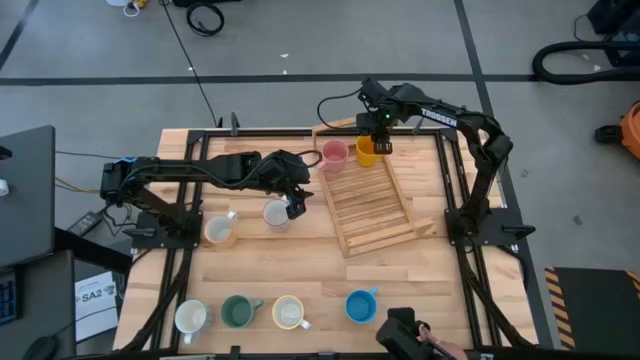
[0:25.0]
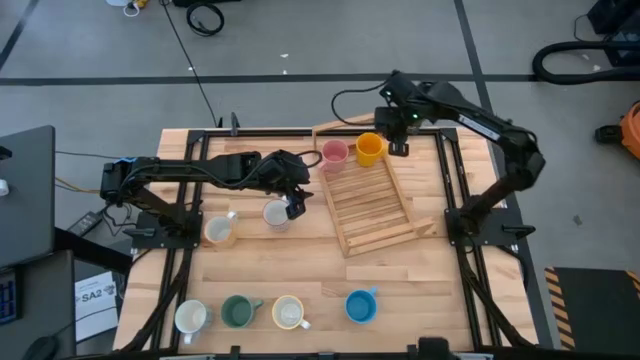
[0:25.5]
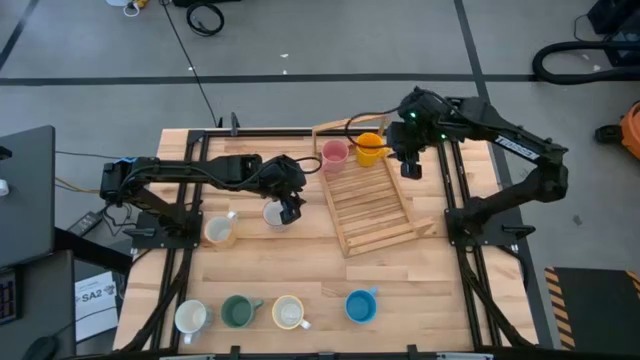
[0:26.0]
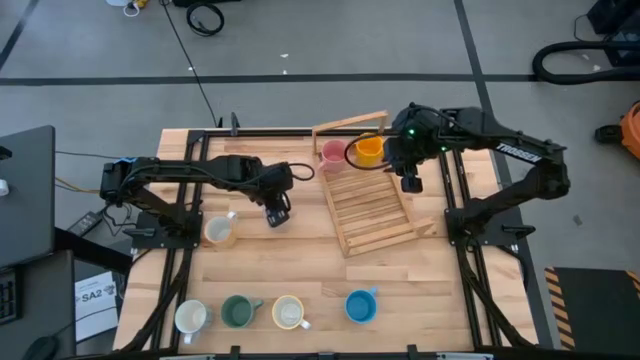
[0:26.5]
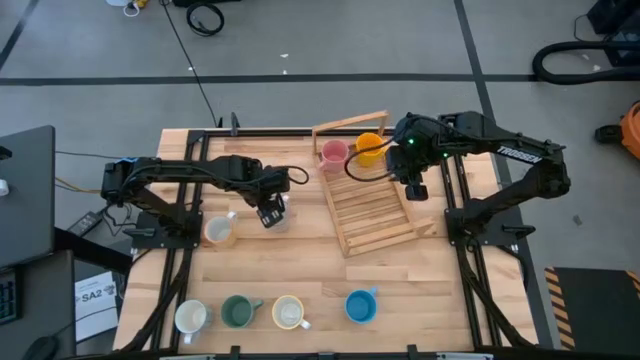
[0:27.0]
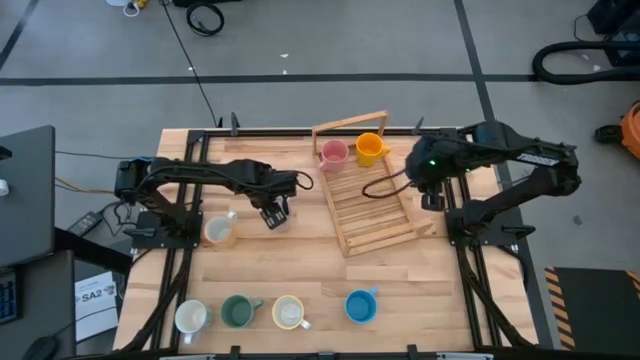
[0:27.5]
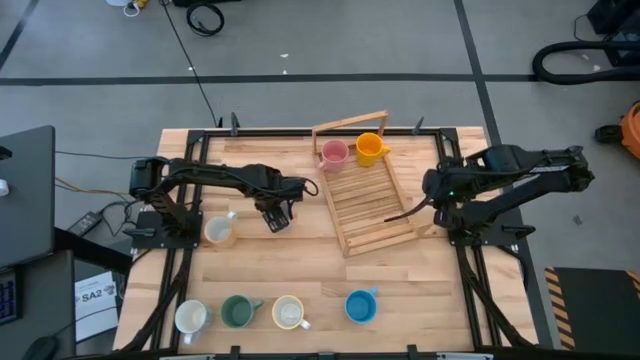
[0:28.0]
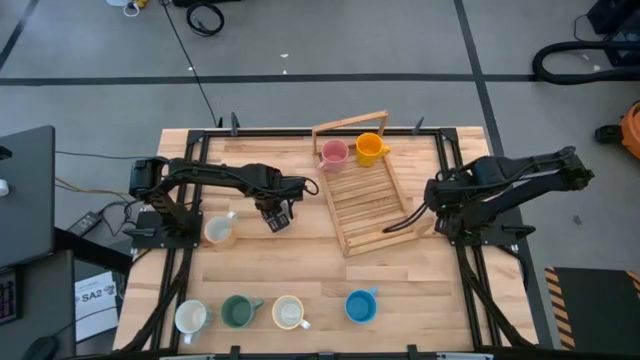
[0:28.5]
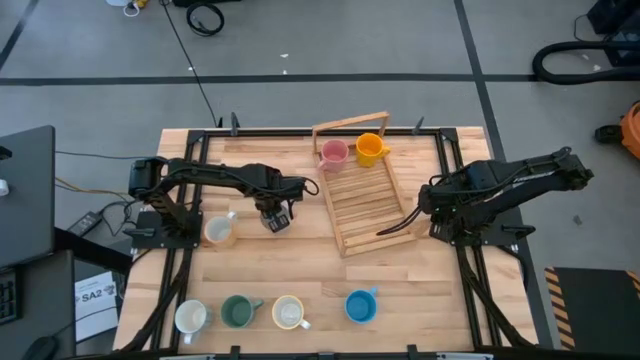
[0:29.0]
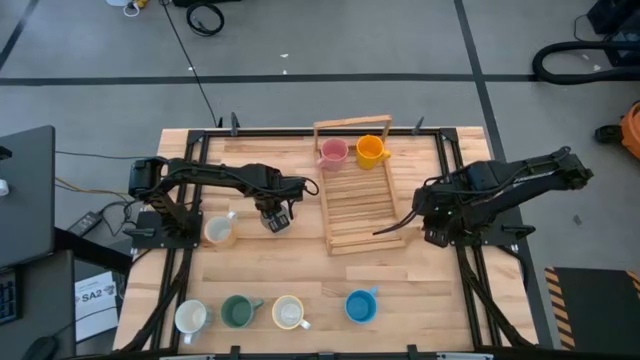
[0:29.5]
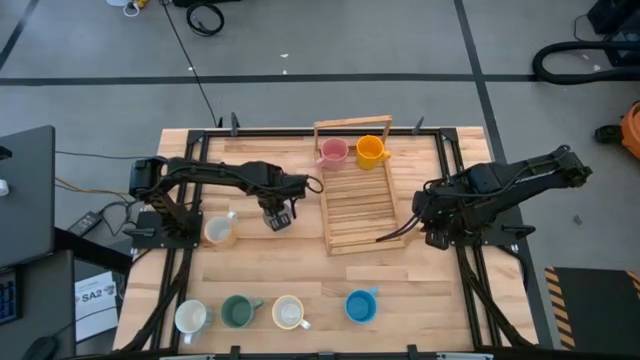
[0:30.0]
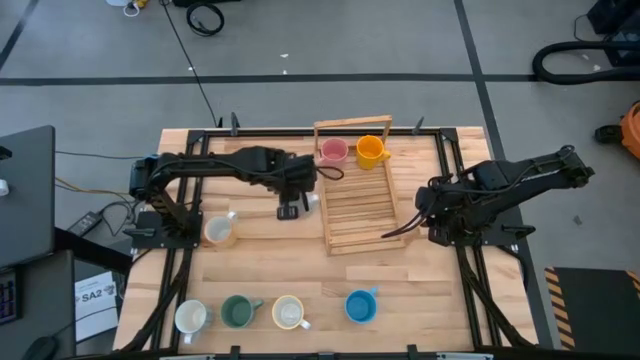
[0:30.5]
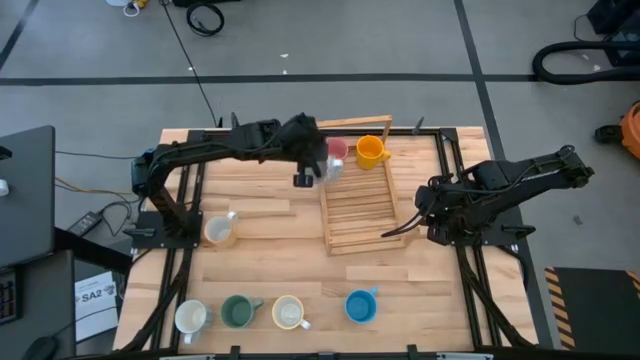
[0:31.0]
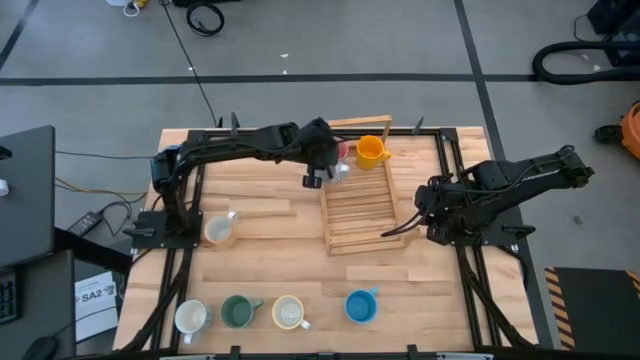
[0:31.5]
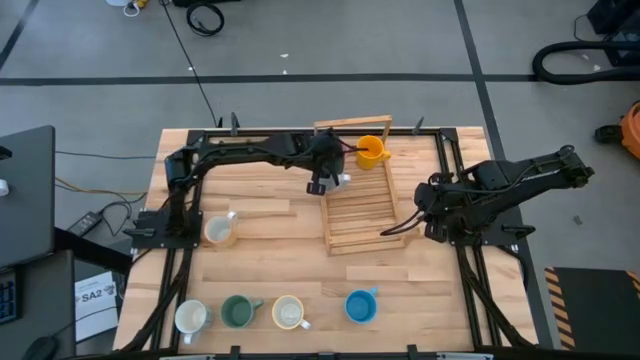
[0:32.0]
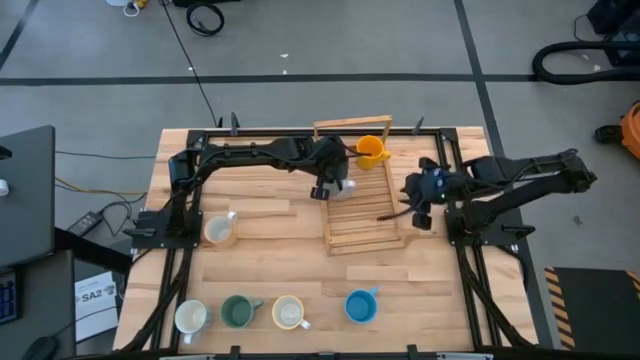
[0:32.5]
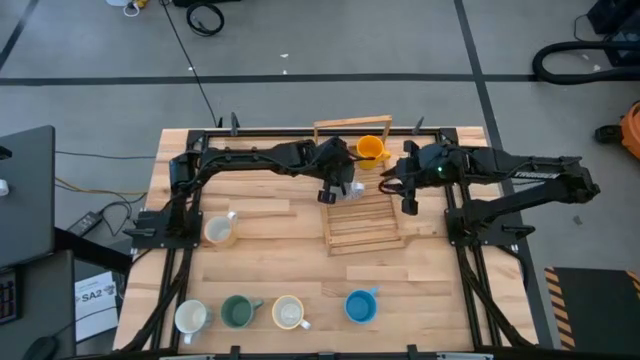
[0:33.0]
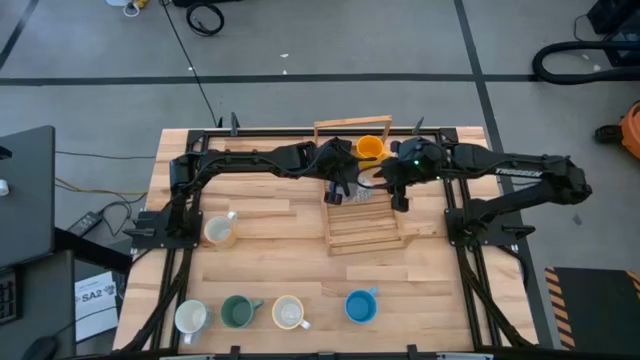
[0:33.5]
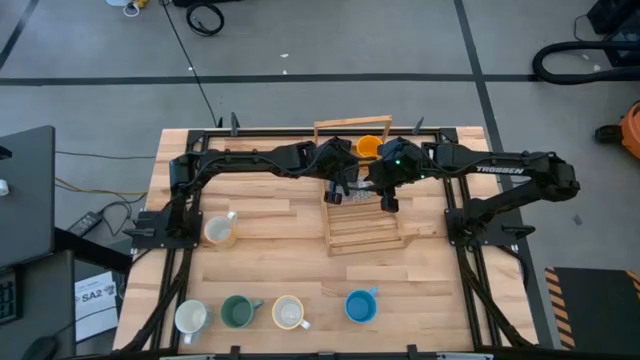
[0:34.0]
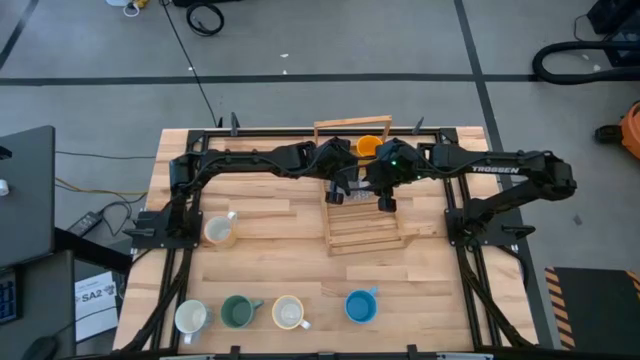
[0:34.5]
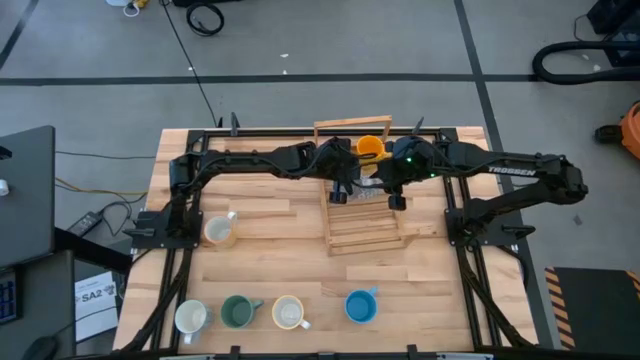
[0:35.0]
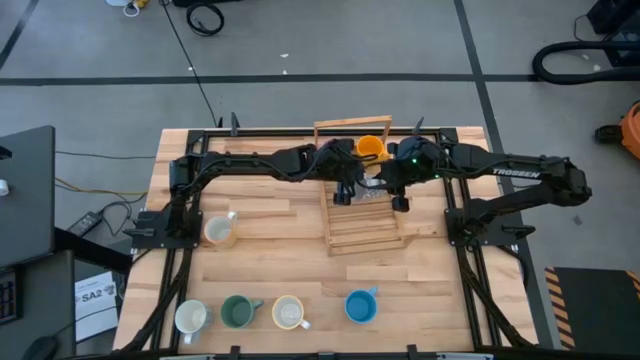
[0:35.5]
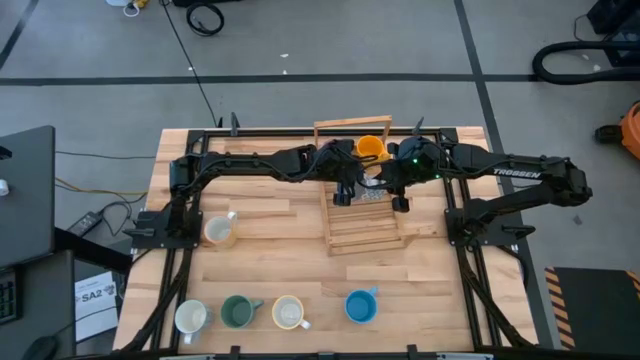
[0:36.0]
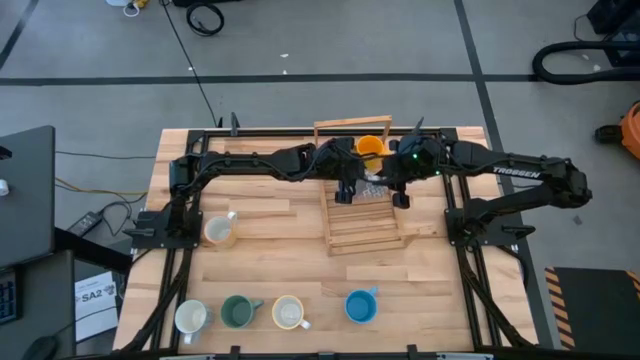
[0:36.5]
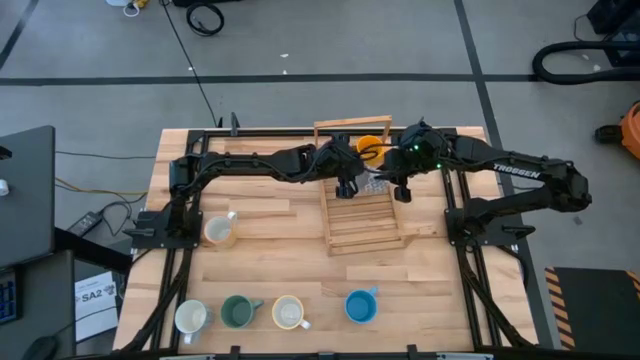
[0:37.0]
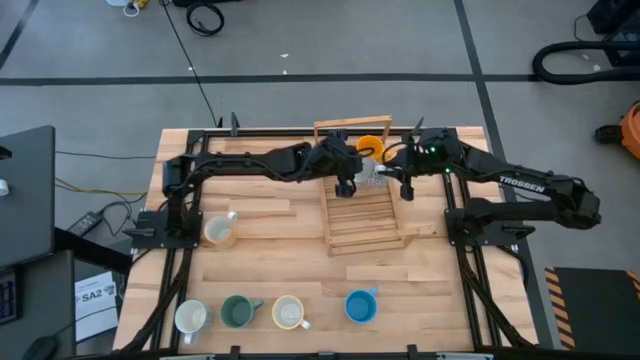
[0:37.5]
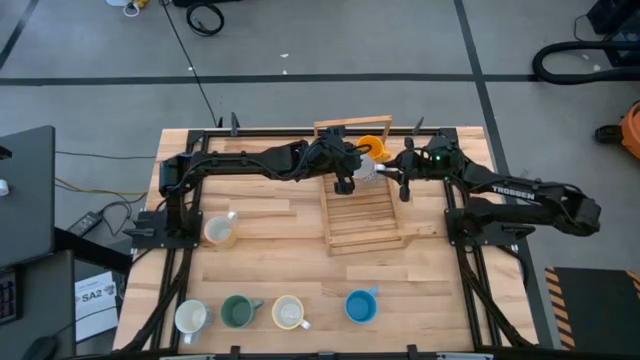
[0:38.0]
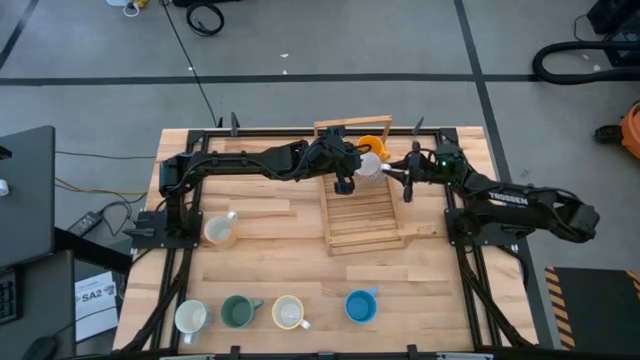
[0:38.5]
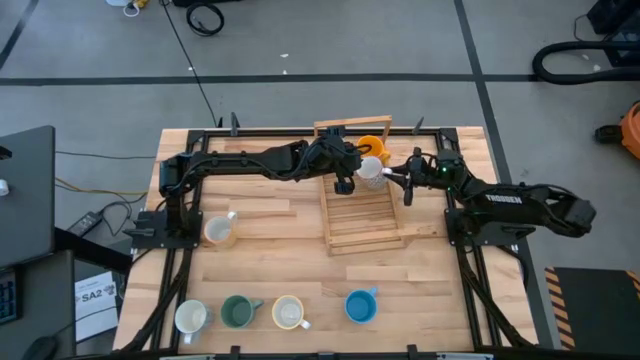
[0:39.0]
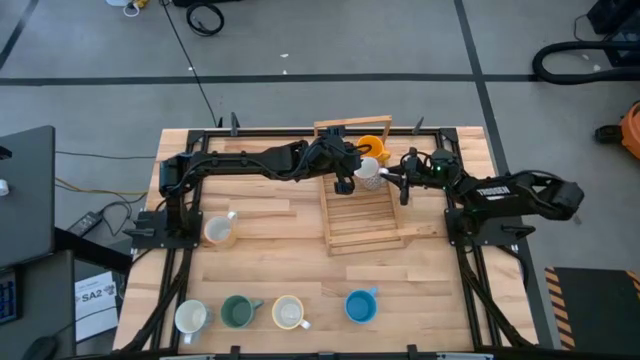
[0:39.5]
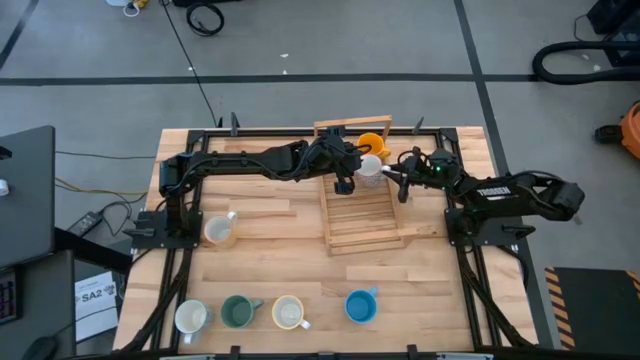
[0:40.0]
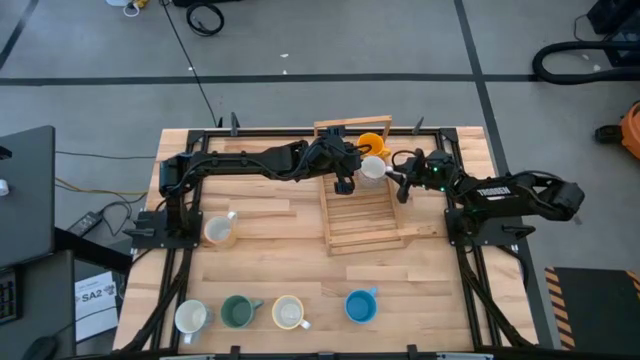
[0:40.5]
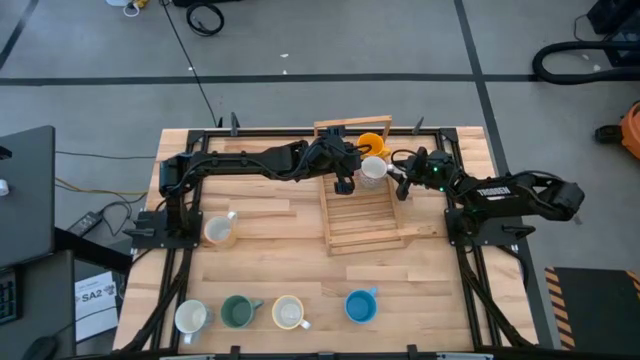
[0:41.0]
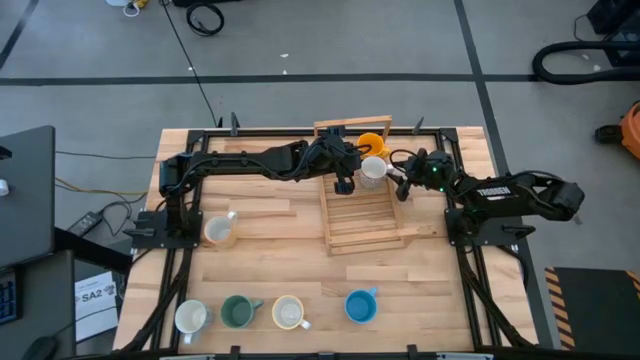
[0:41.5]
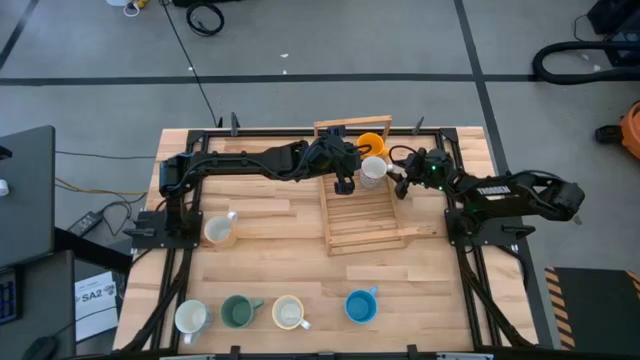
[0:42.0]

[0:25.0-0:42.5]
Task: Place coffee mugs
Put the gray patterned mug on the shelf

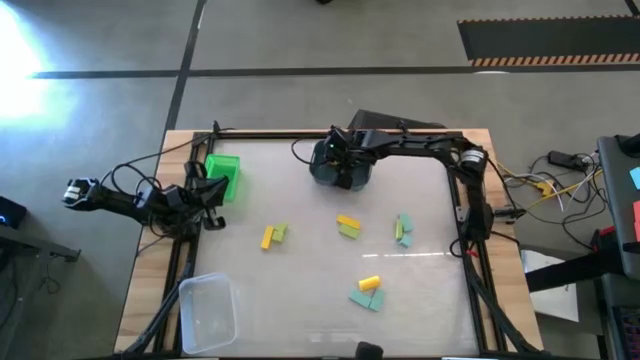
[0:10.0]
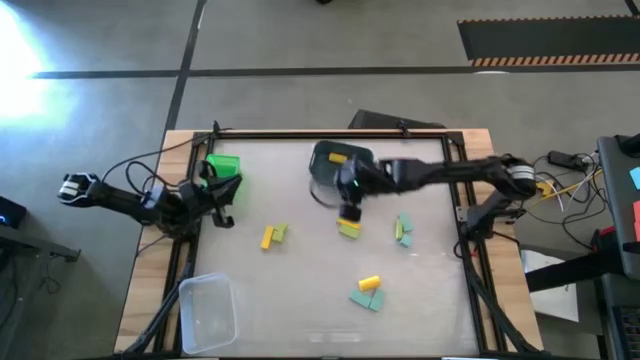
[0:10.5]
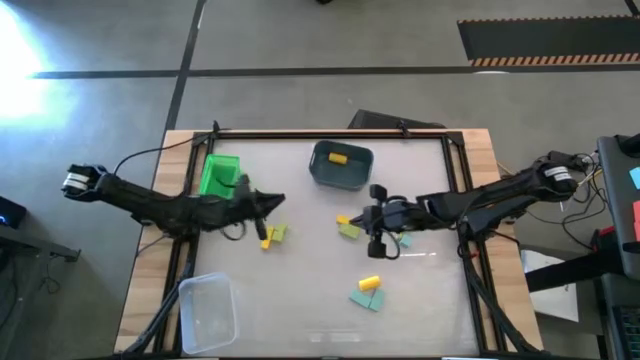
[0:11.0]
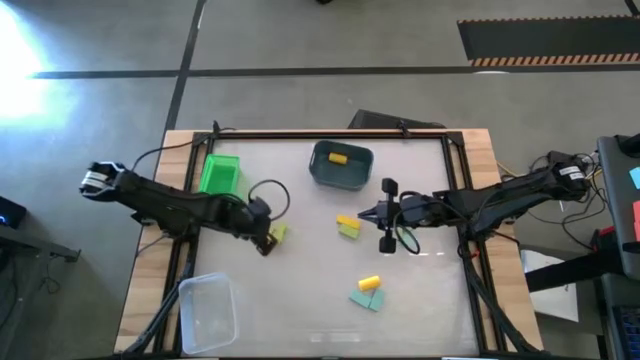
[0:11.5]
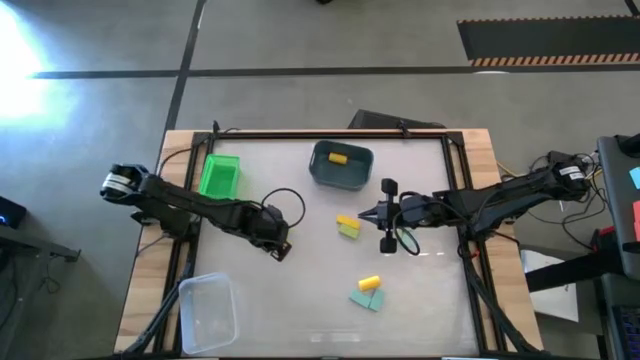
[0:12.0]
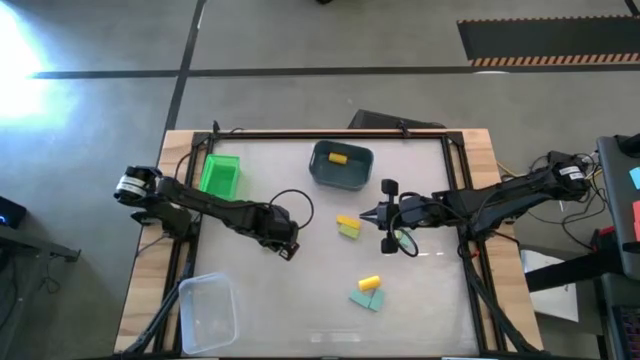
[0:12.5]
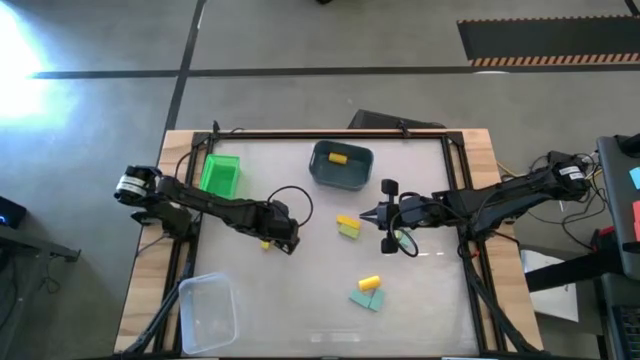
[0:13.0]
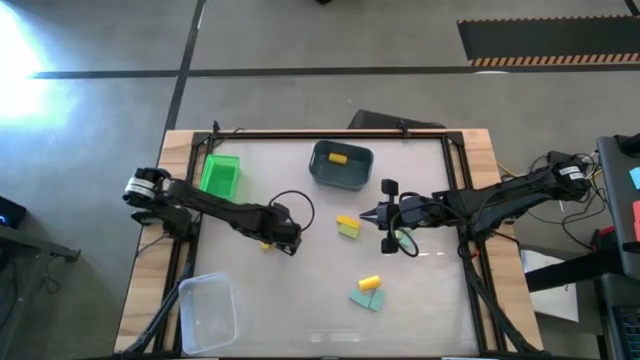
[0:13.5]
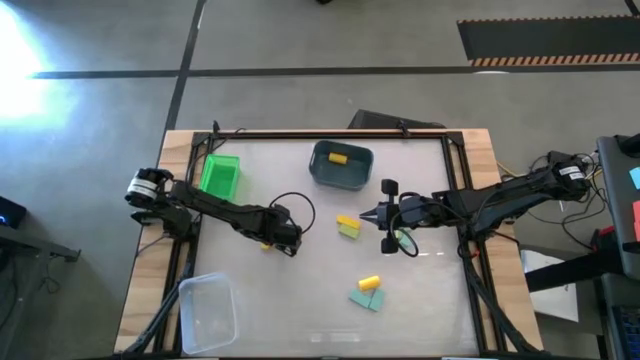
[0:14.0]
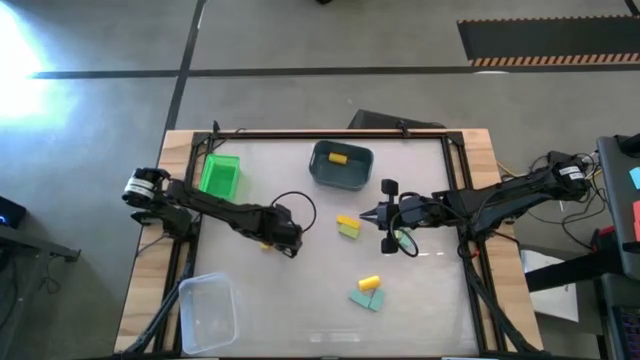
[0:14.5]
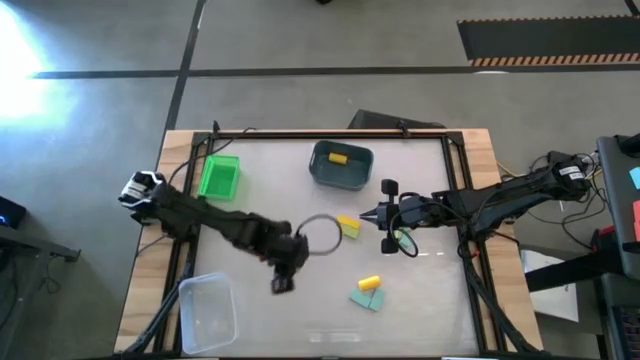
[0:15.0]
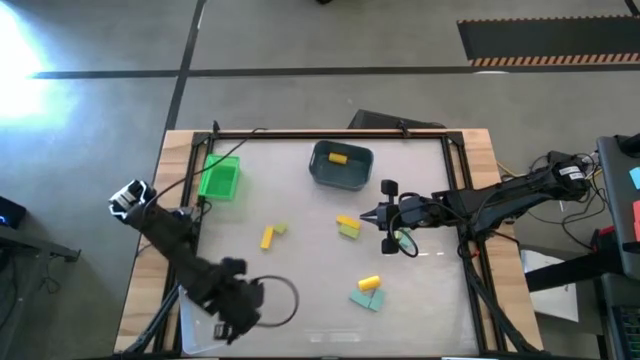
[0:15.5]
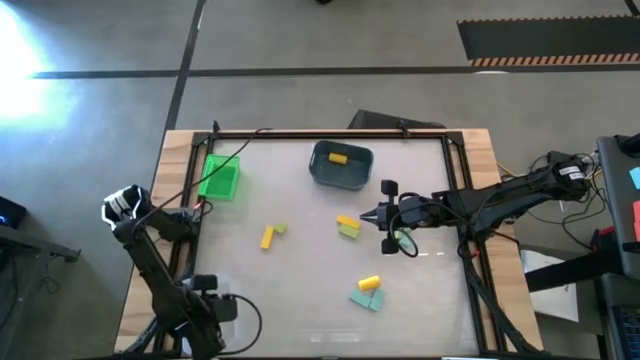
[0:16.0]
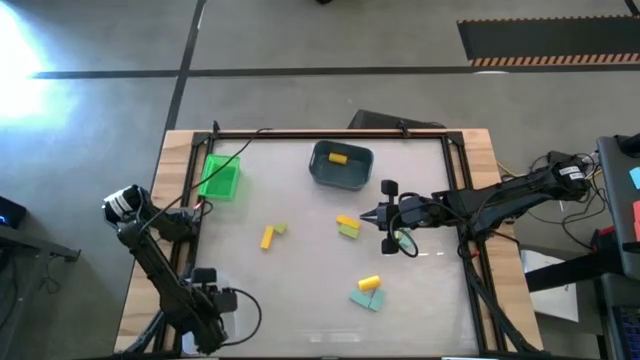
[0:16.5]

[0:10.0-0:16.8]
Task: Sort & place blocks by color
Put the green block into the transparent bin
